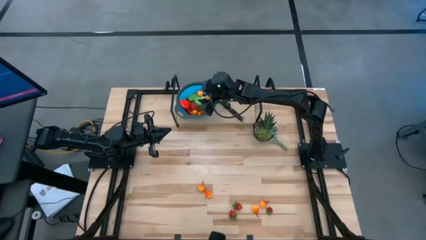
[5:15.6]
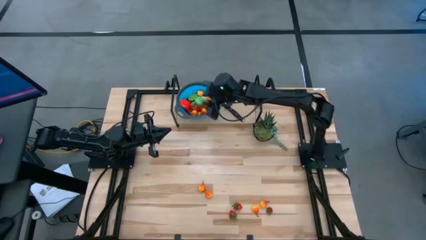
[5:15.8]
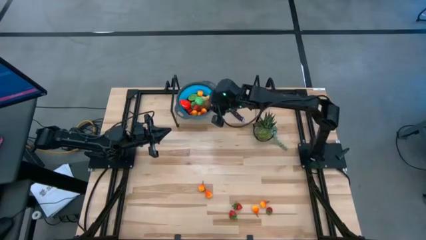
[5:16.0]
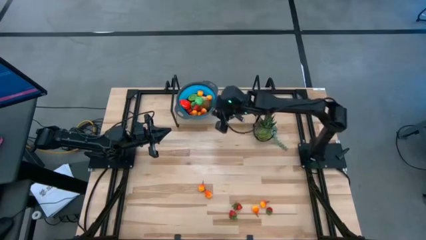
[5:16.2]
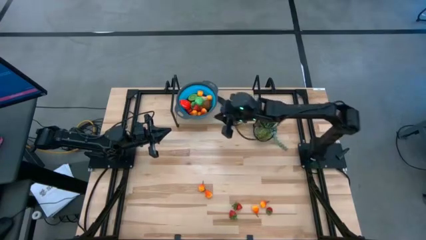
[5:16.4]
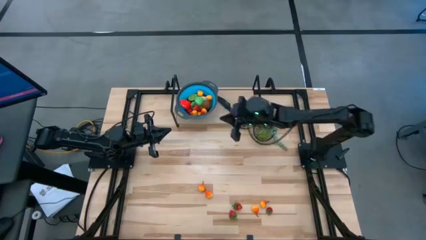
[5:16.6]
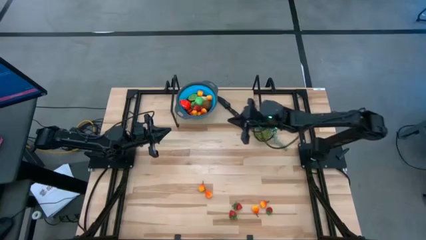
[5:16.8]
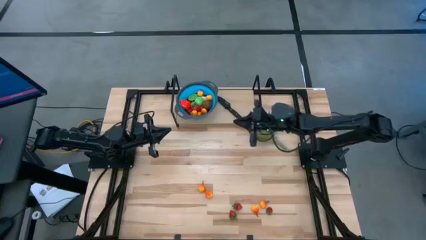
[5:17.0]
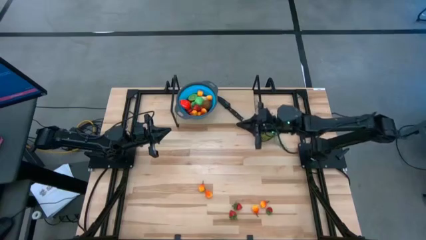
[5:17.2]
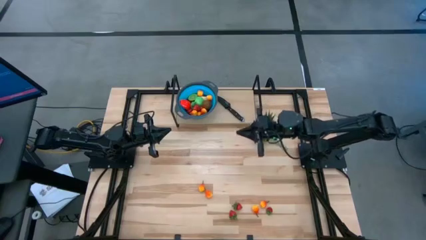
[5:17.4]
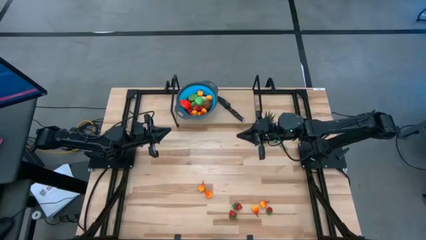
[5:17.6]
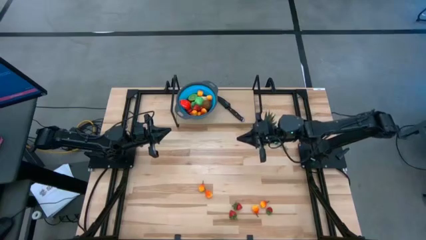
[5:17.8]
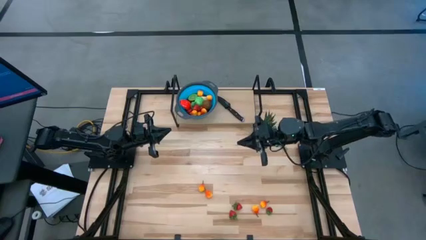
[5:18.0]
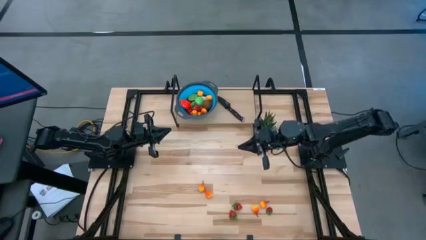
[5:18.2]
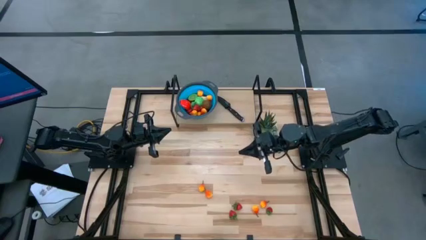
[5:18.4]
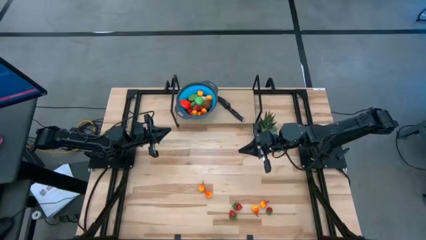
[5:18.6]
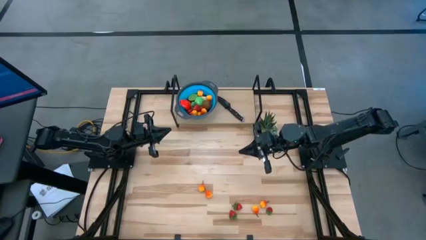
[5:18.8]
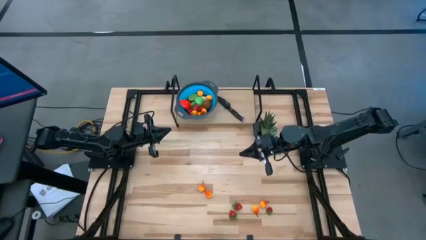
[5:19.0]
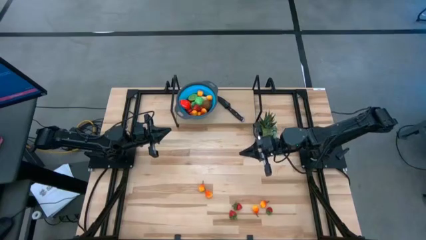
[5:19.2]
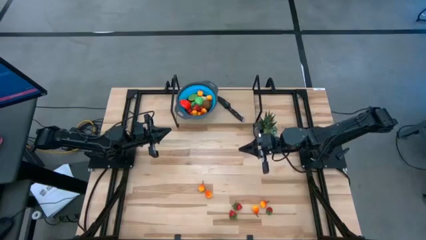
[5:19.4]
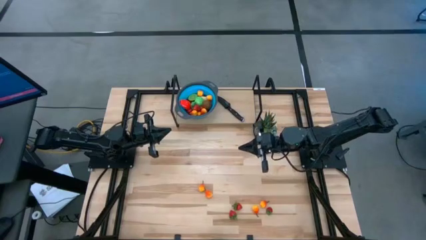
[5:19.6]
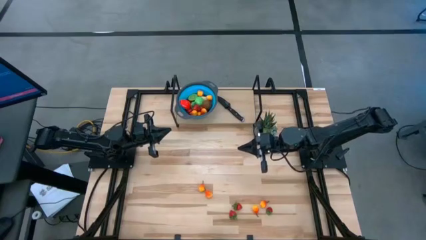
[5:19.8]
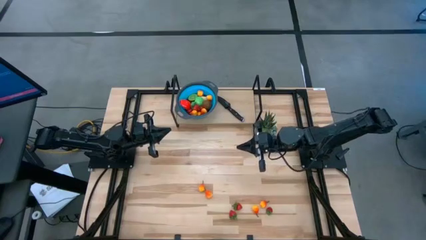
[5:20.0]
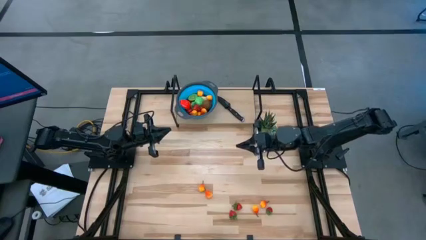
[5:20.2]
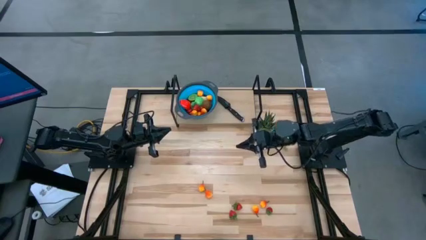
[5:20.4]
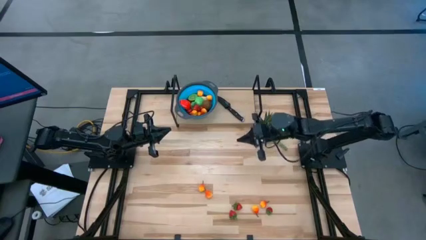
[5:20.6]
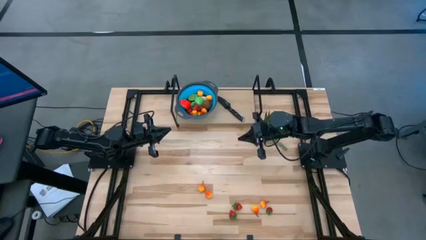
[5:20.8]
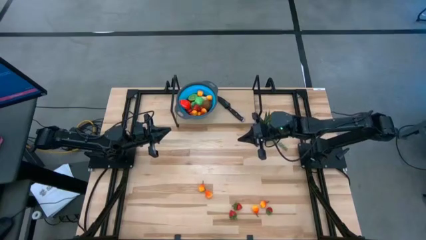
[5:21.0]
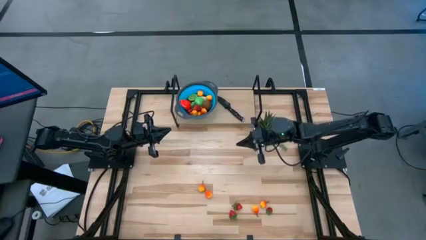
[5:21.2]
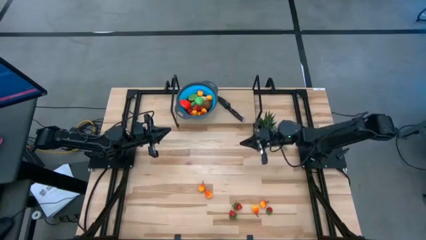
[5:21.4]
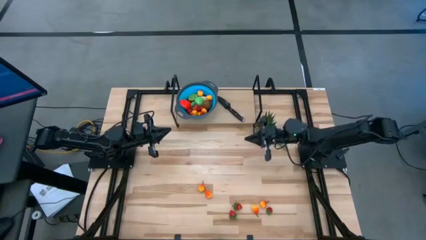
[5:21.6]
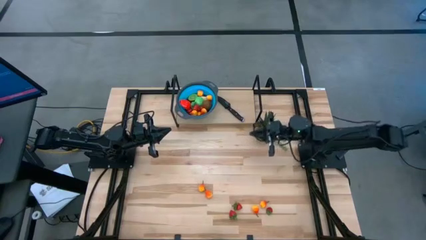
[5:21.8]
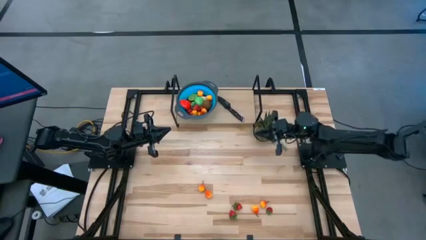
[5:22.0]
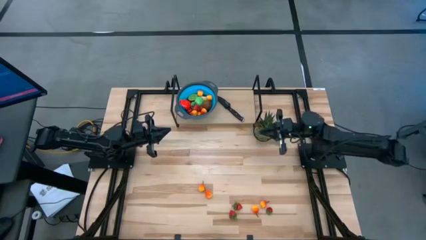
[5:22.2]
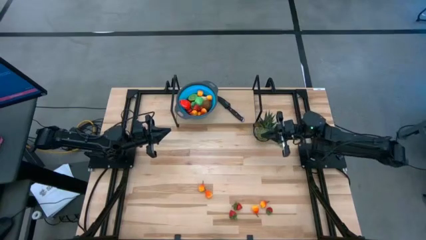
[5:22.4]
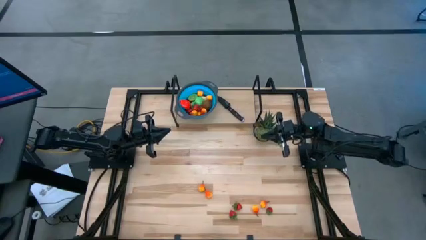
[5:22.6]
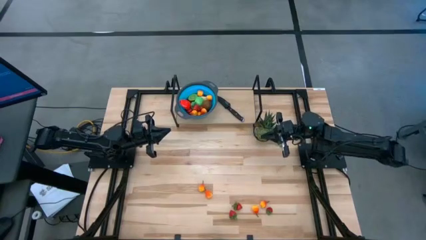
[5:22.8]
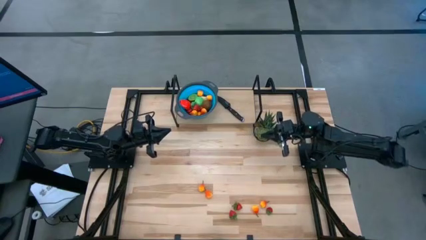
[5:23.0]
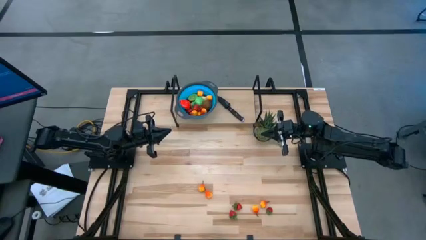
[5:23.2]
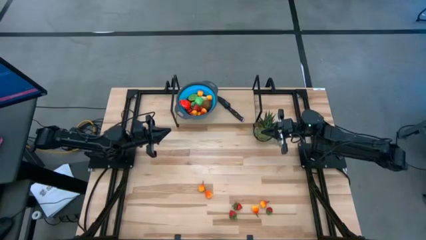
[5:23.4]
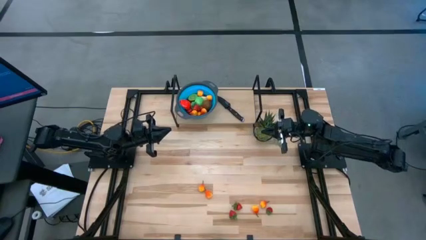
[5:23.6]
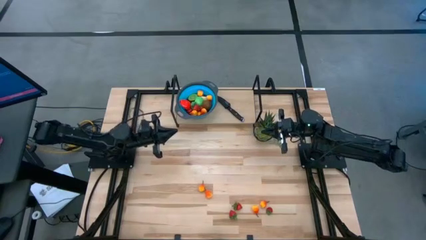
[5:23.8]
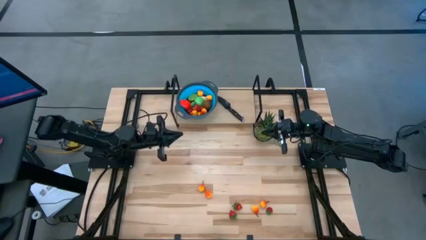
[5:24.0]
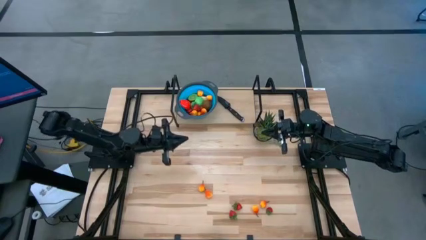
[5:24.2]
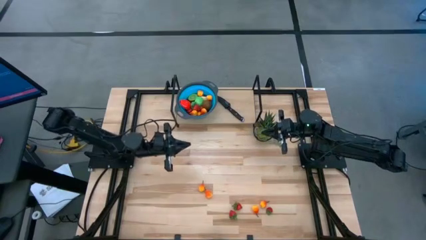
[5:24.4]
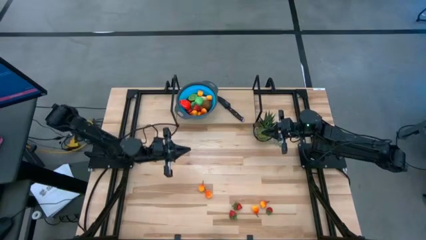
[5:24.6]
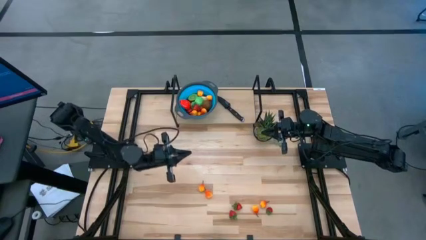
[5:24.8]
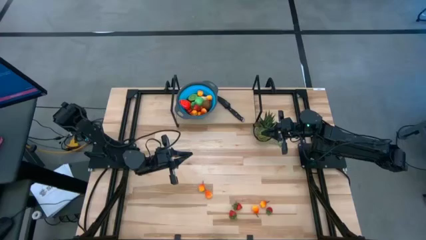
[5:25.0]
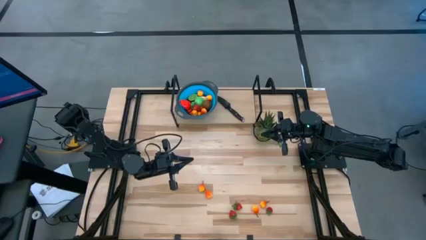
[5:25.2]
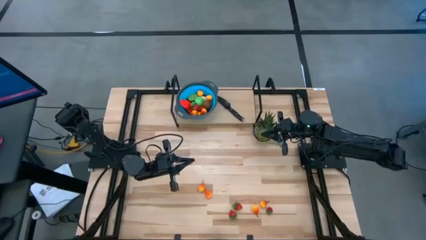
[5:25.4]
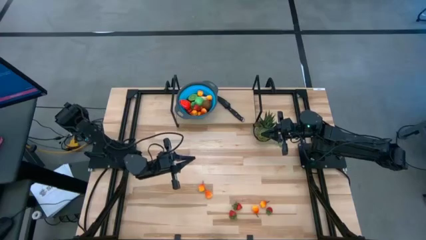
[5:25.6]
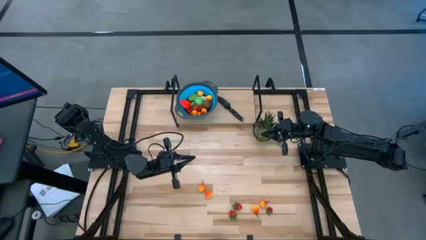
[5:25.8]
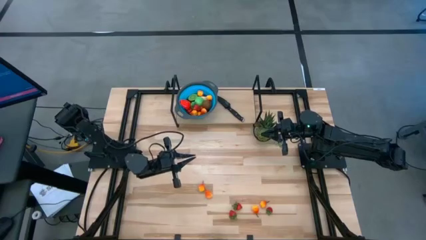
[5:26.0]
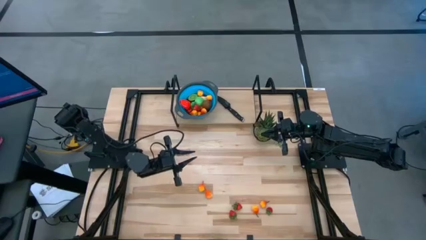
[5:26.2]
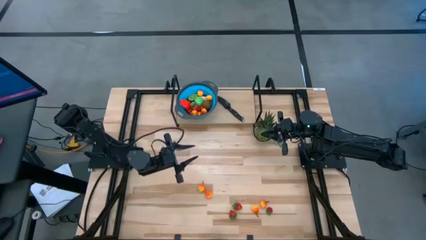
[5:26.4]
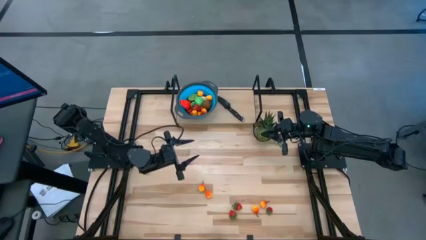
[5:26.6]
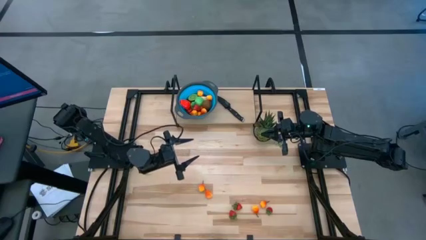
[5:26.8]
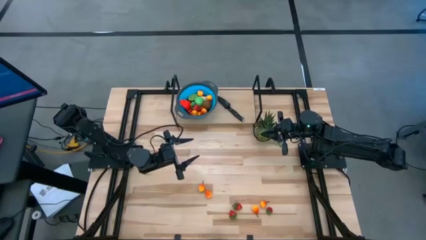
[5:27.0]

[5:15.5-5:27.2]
Task: Pick & Place Fruit
Put the pear into the basket

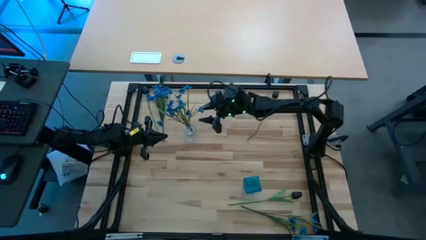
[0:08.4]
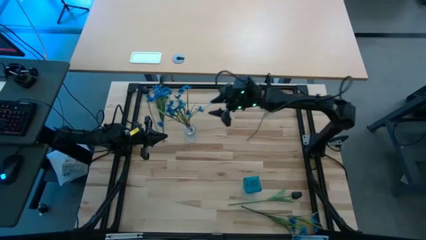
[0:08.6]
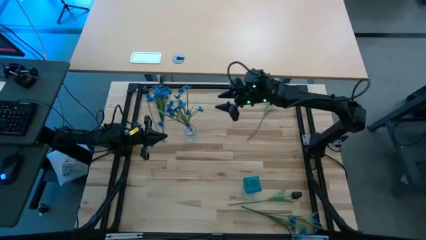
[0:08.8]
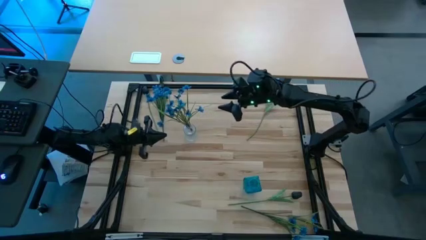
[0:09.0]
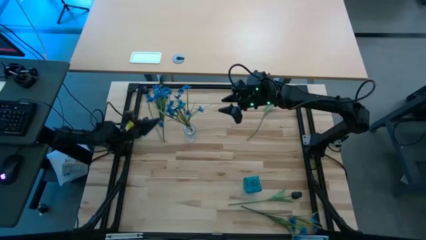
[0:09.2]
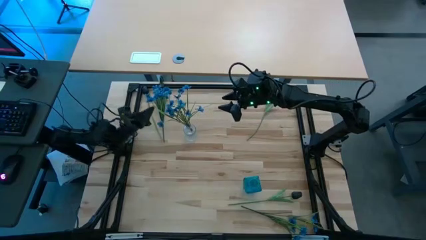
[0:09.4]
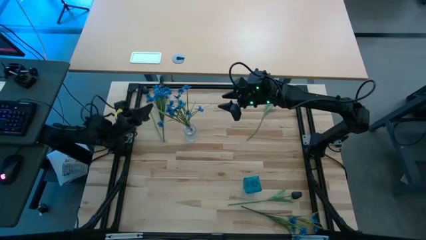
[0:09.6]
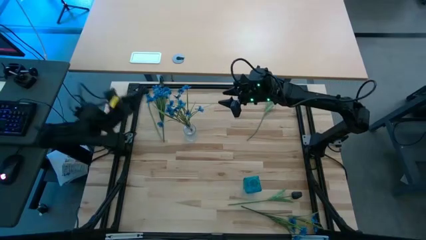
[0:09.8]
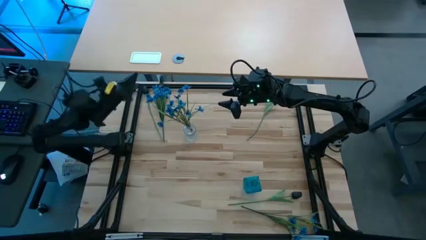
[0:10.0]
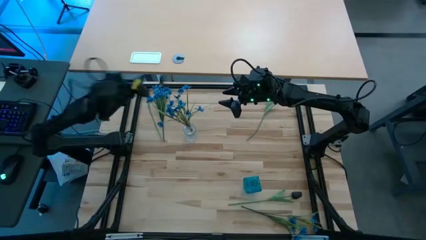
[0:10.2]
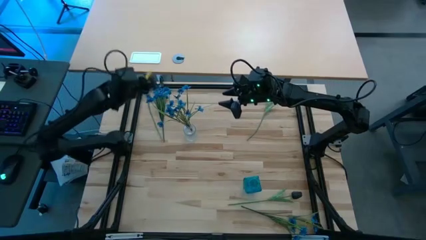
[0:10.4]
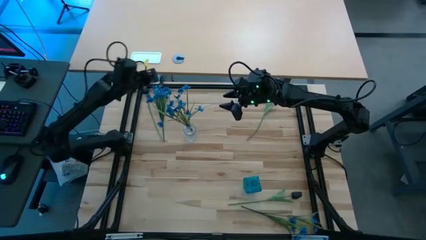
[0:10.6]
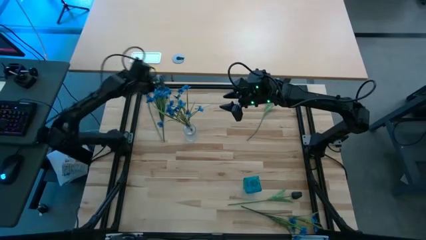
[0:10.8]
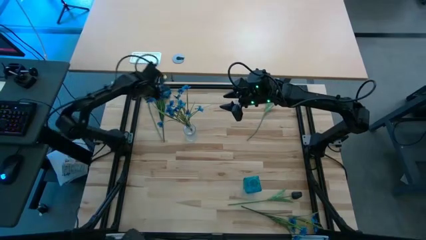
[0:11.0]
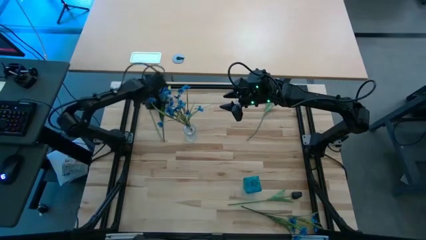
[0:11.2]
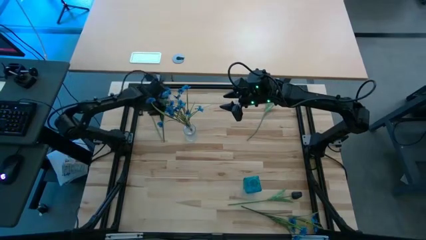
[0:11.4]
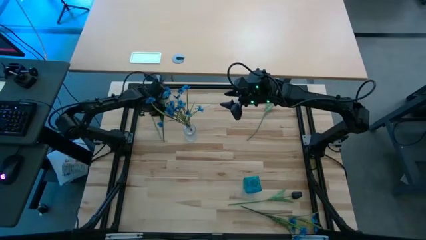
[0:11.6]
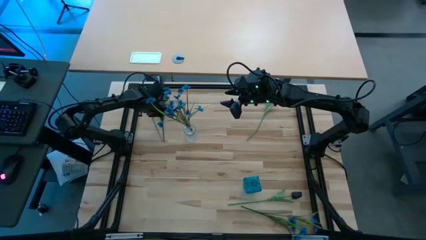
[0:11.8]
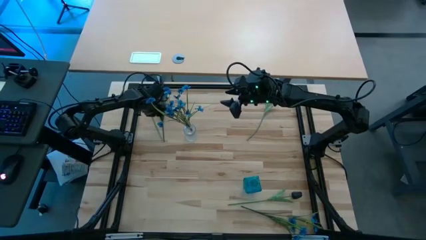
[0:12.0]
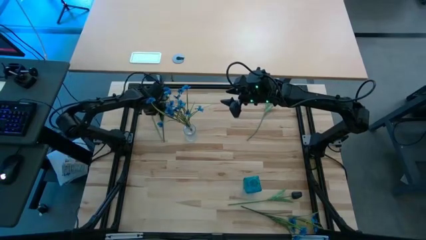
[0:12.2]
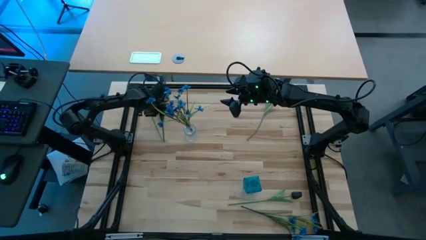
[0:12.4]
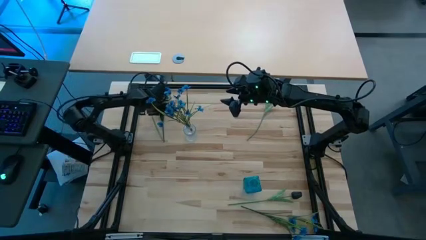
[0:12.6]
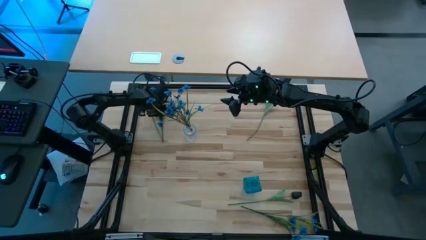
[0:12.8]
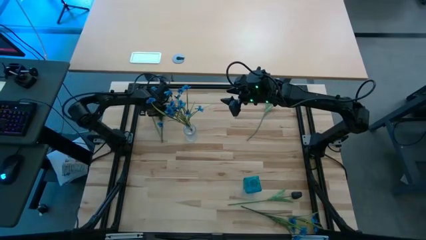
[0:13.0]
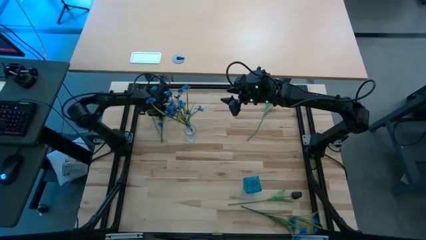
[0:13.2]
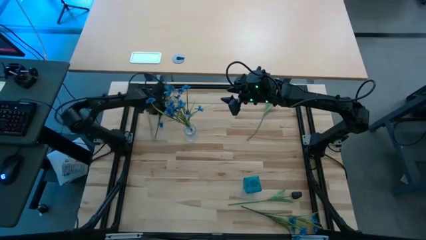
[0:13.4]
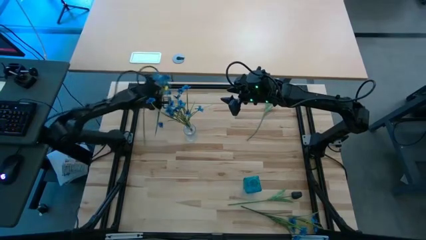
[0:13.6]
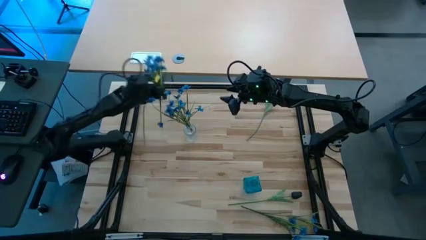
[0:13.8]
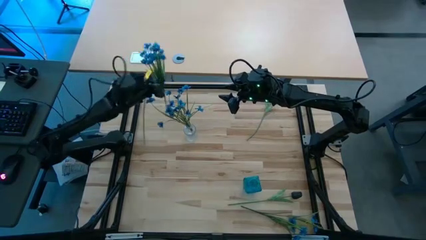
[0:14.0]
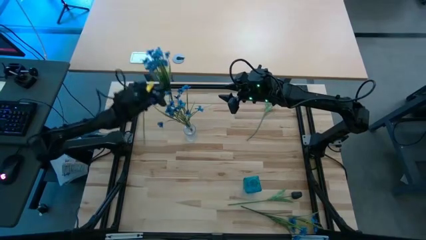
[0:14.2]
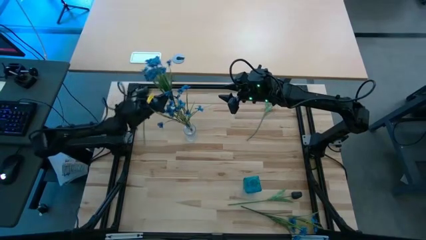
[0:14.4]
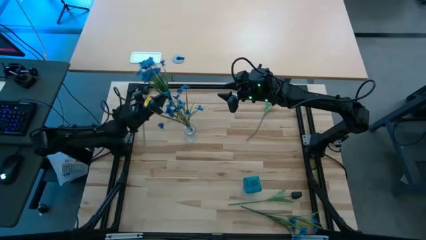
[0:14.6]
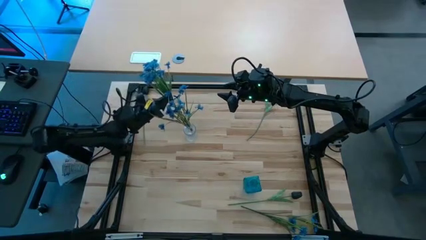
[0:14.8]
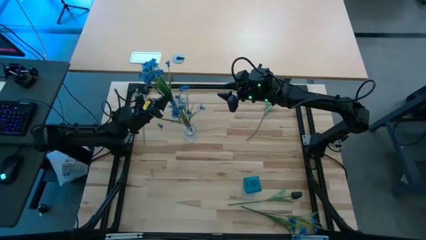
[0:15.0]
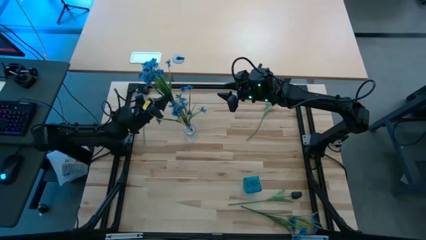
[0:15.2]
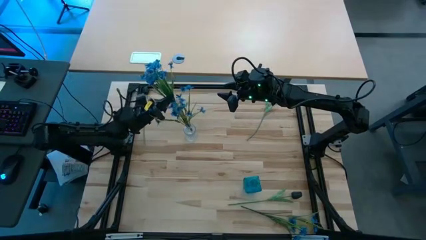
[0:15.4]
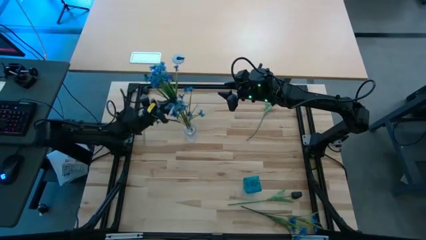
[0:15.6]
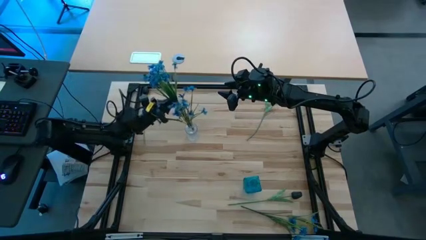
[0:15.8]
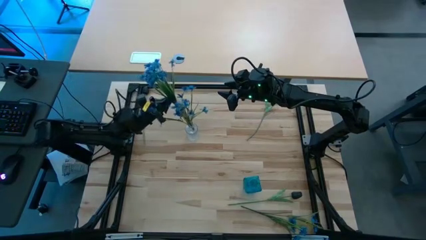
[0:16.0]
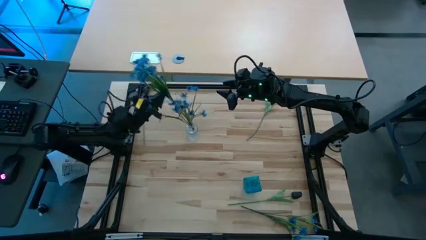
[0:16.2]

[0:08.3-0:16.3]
Task: Sort flowers into vase by color
Put the top light blue flowers into the transparent vase
